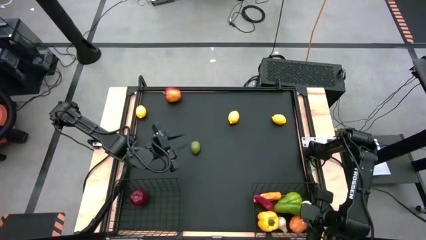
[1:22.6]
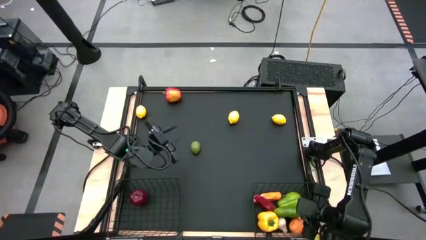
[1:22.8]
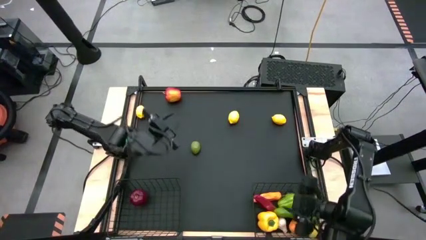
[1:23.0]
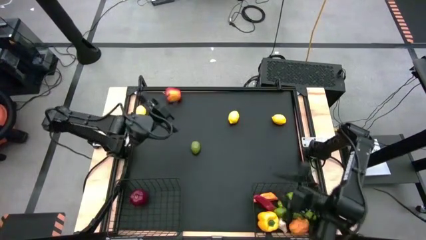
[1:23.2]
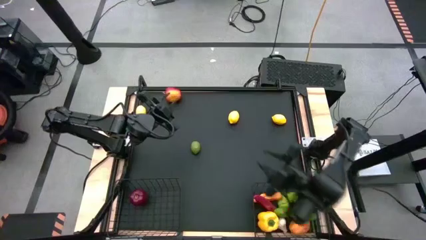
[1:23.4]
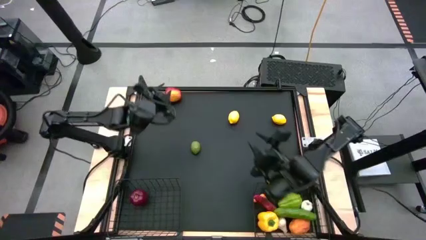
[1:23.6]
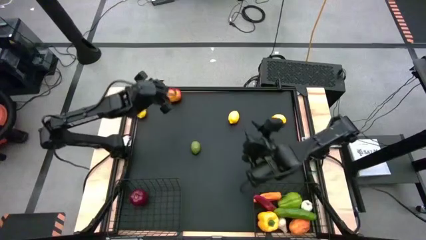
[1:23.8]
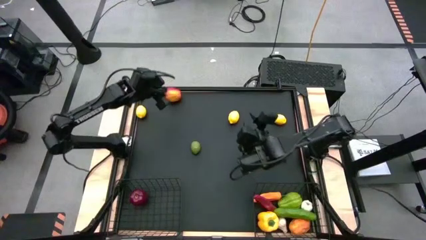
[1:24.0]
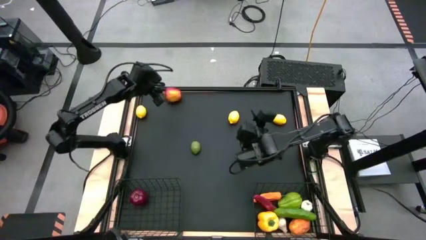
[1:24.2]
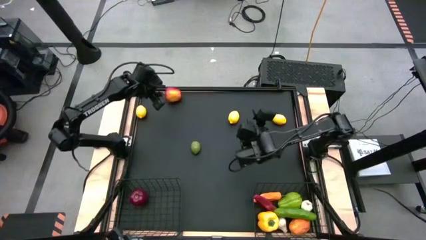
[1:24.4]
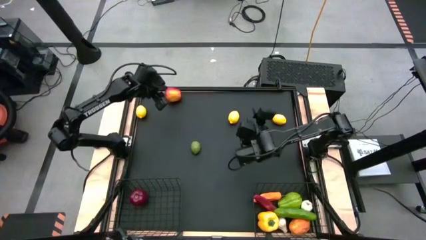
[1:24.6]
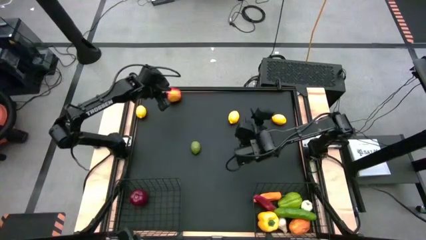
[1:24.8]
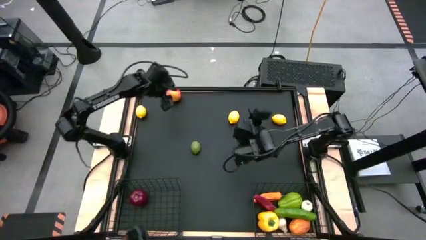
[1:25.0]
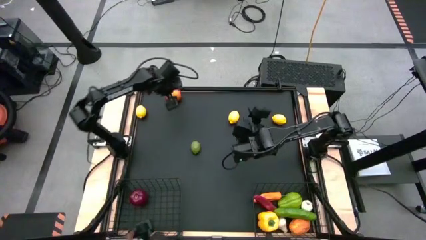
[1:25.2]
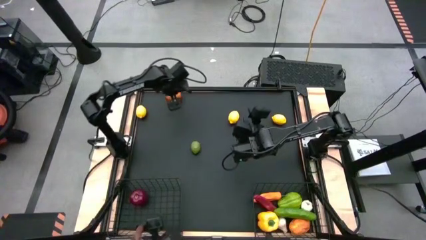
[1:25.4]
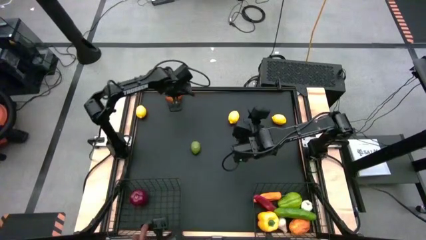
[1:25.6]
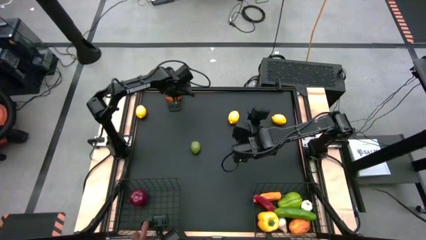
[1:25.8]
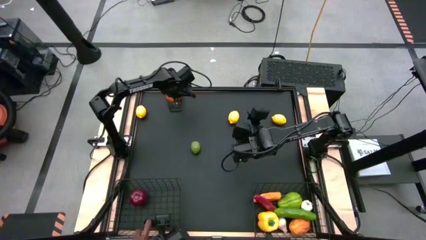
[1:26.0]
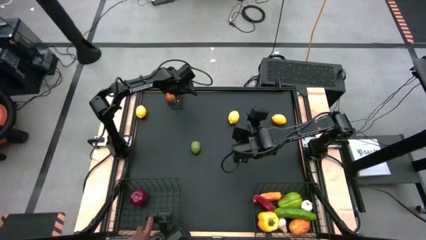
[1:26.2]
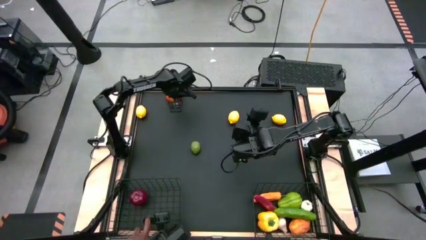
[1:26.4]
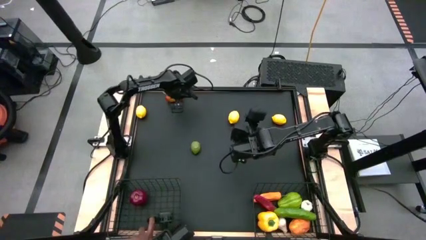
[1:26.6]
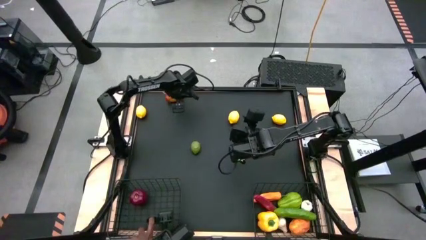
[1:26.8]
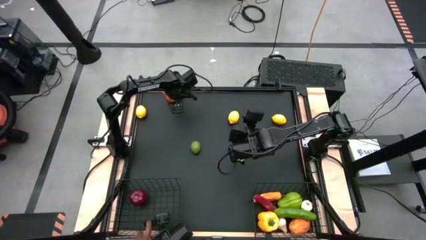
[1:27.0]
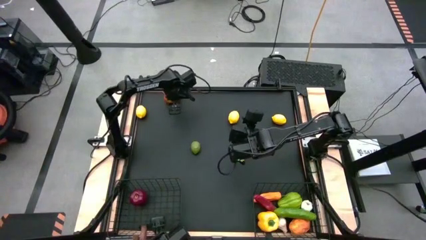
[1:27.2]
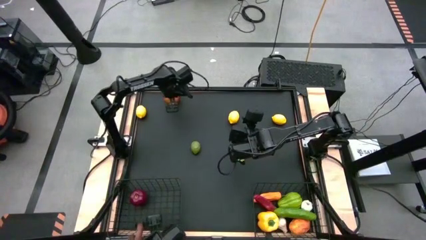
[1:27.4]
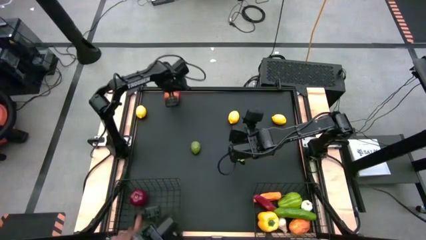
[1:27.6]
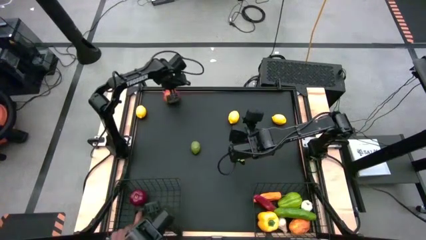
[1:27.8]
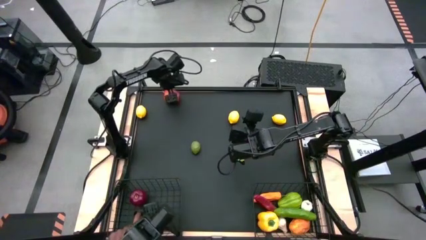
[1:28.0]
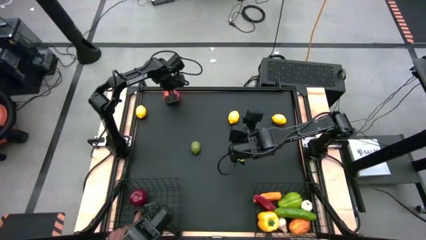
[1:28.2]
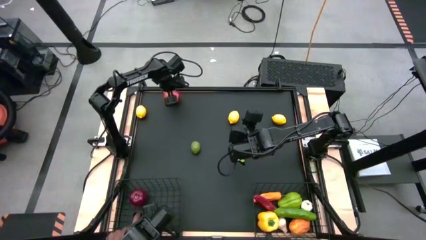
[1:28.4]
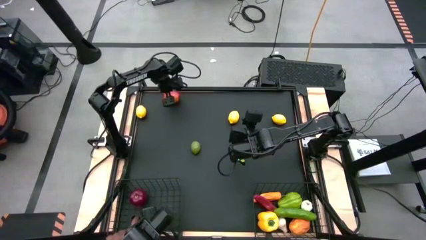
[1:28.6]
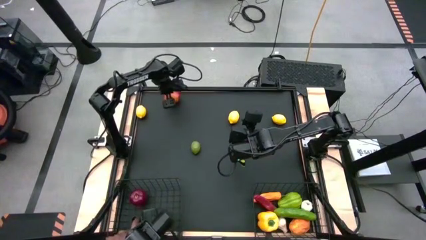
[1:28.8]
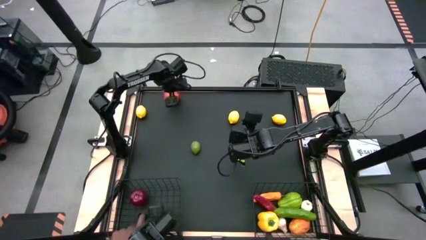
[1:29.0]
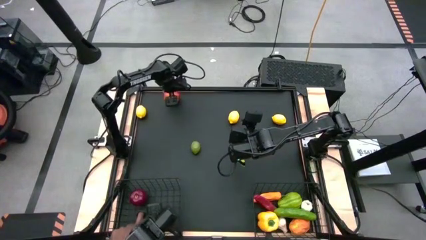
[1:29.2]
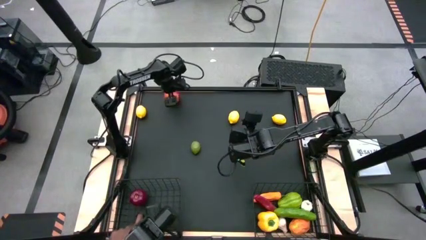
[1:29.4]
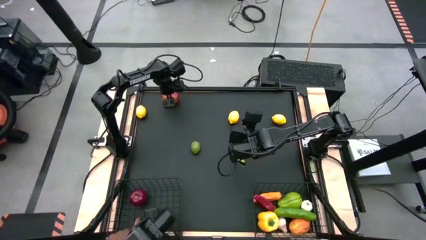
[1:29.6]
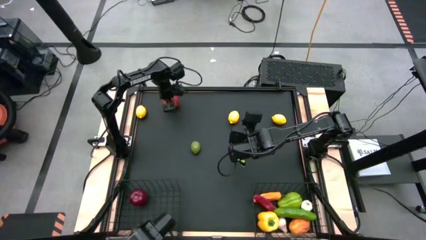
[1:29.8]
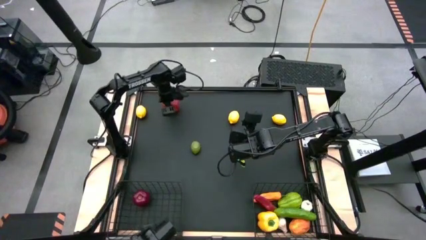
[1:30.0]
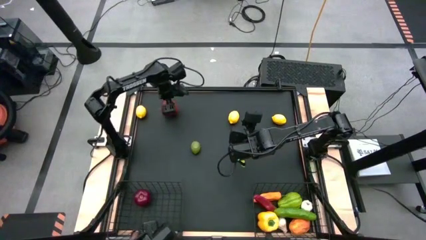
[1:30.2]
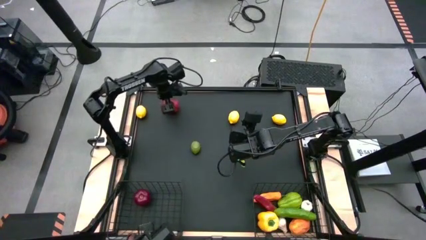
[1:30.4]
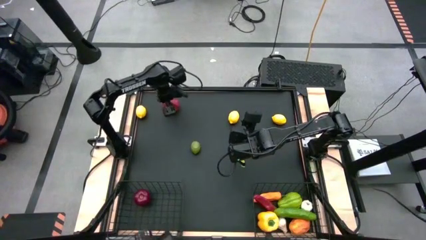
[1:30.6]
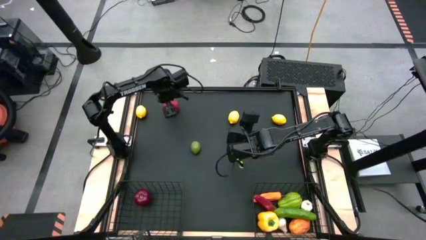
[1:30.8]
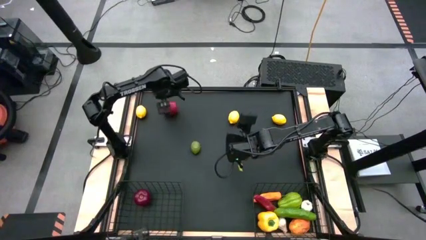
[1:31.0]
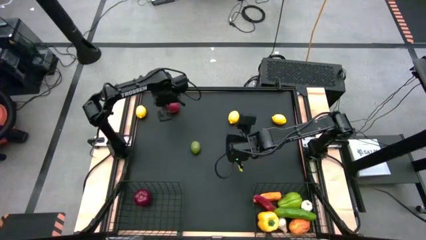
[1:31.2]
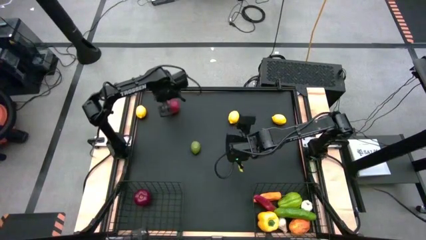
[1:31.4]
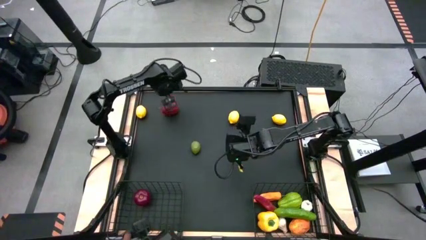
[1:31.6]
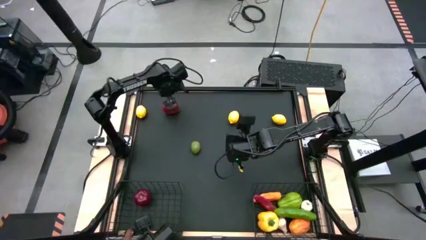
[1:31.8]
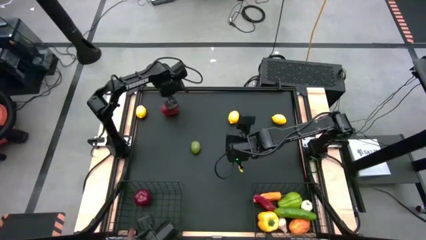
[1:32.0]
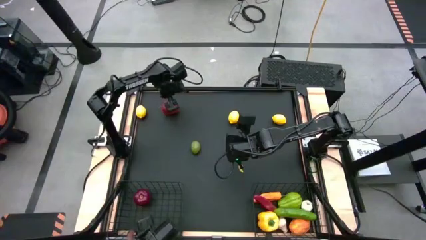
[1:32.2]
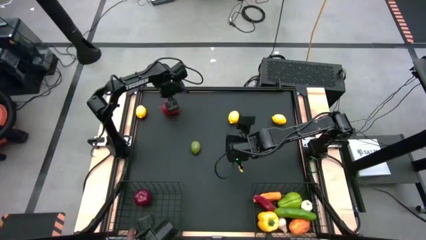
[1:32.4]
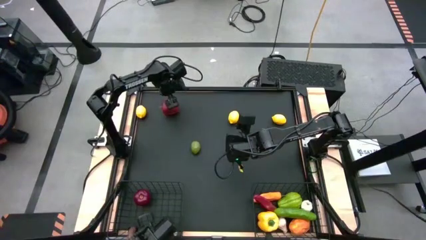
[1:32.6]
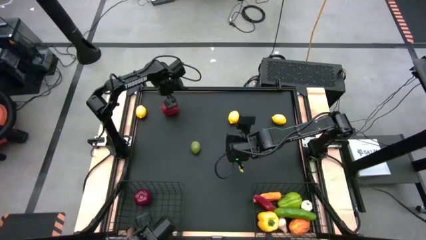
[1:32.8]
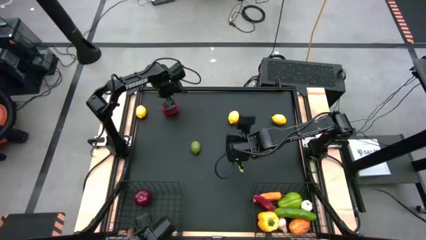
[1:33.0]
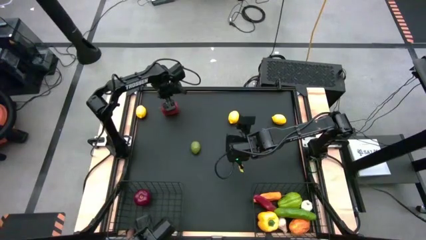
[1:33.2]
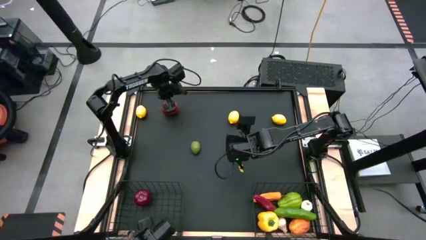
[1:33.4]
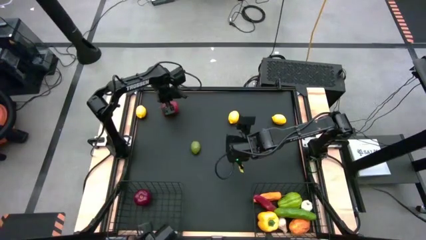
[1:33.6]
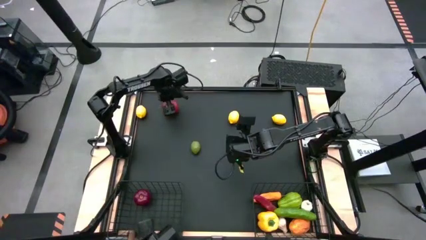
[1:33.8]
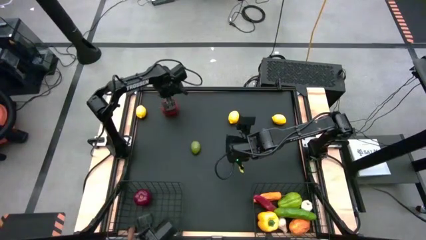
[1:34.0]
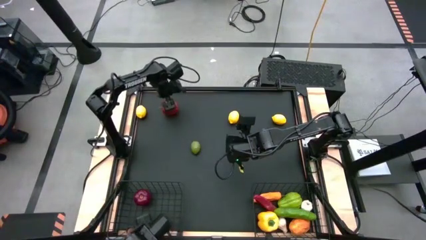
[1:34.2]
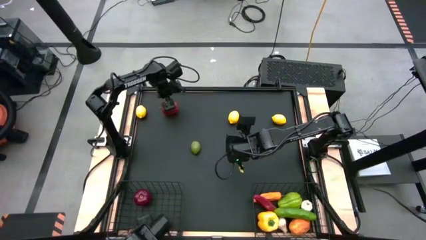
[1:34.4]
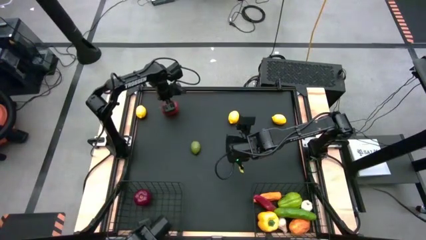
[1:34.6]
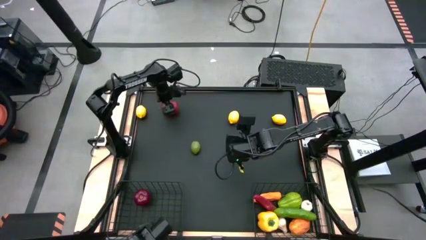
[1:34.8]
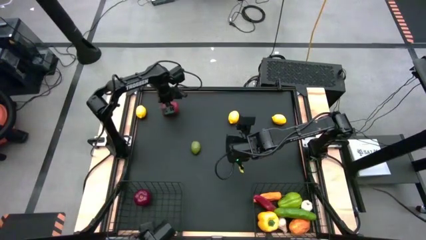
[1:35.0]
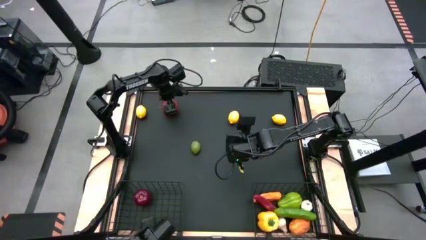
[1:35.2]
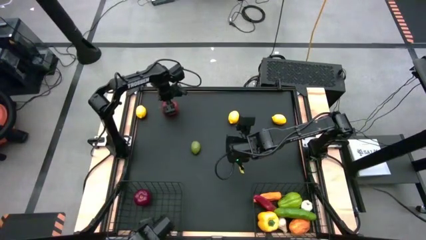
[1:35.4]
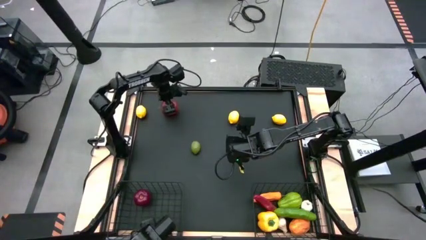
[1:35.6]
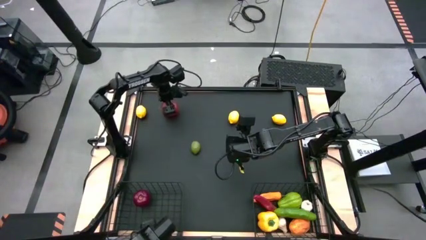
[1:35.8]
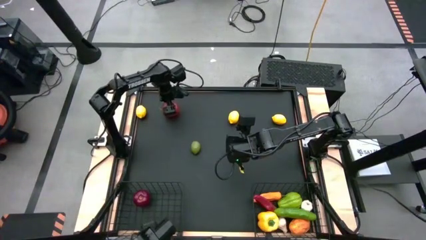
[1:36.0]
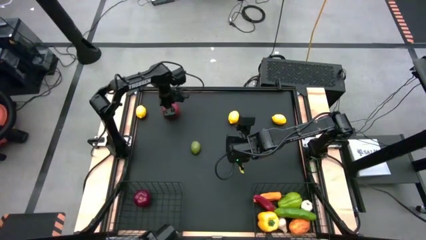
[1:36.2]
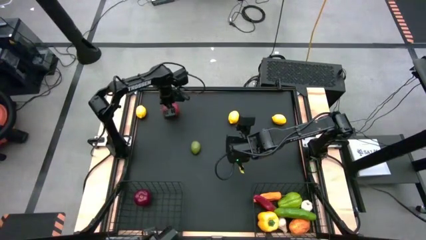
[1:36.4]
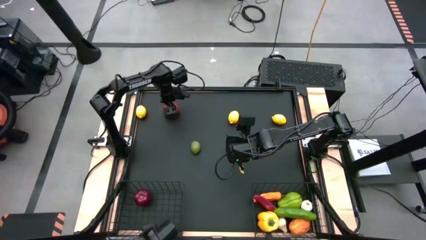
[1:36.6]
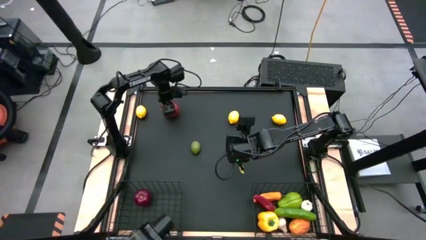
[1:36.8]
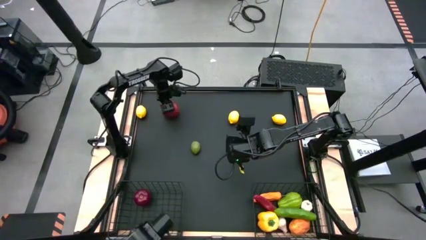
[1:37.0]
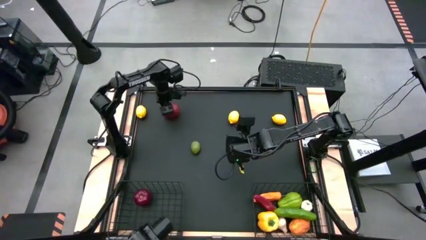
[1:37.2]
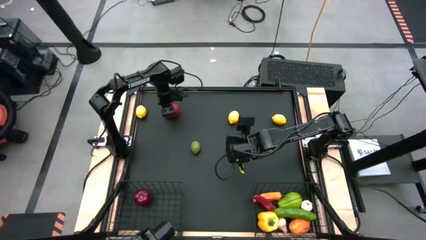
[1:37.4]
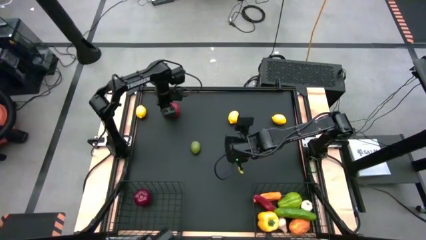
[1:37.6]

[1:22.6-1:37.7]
Task: Sort produce into baskets
Put the red apple into the left wire basket
